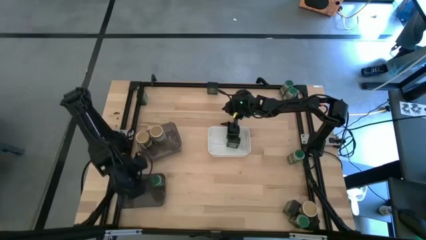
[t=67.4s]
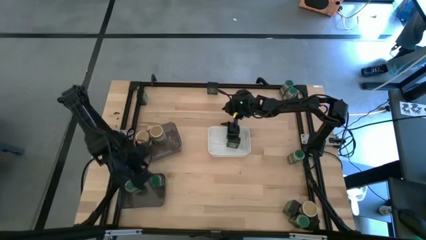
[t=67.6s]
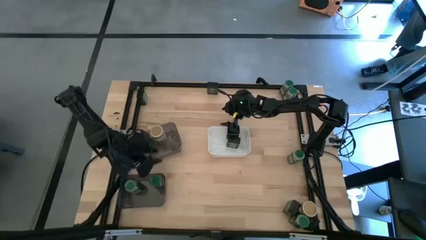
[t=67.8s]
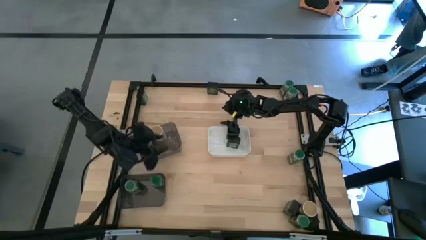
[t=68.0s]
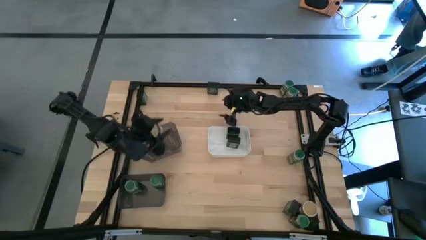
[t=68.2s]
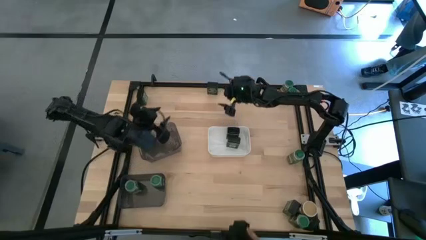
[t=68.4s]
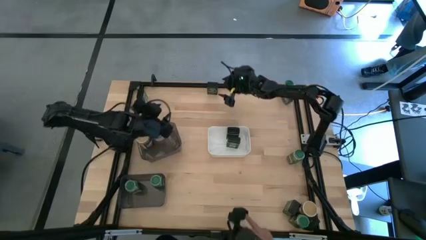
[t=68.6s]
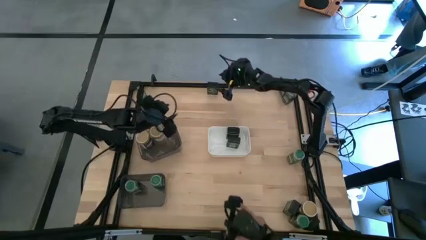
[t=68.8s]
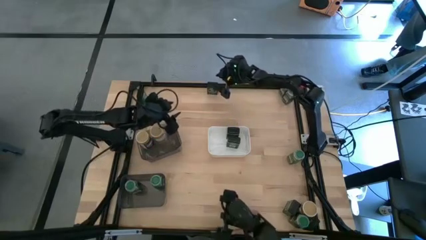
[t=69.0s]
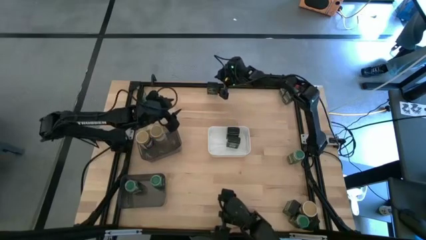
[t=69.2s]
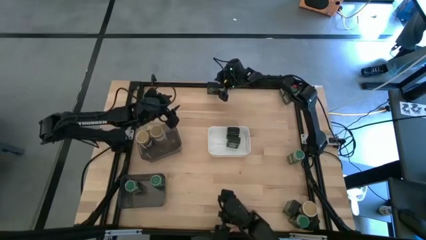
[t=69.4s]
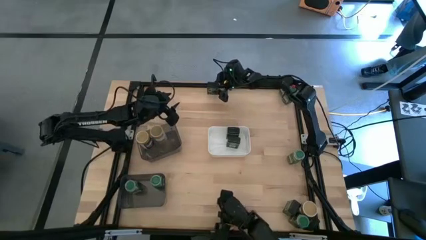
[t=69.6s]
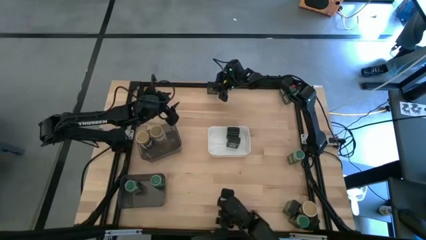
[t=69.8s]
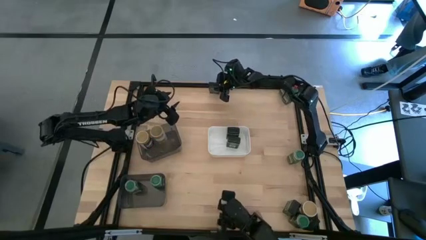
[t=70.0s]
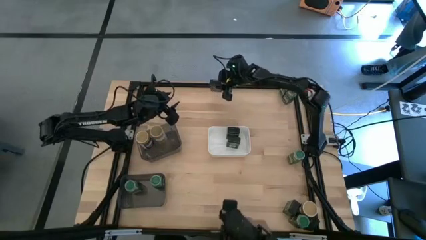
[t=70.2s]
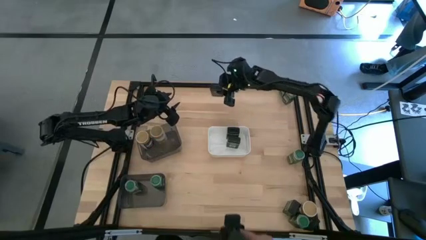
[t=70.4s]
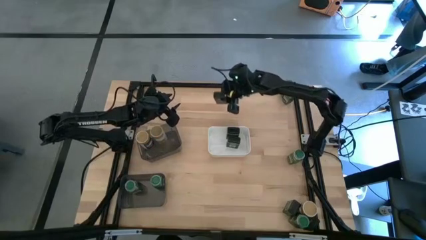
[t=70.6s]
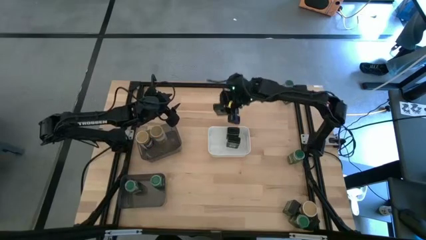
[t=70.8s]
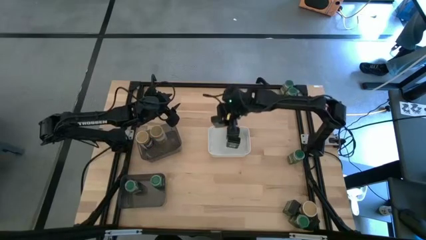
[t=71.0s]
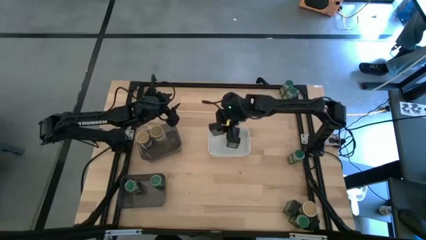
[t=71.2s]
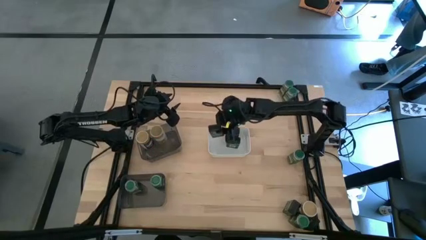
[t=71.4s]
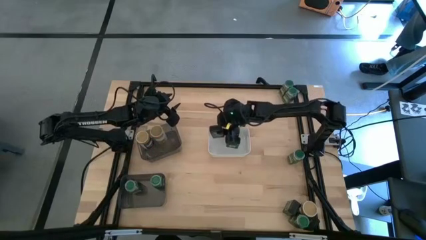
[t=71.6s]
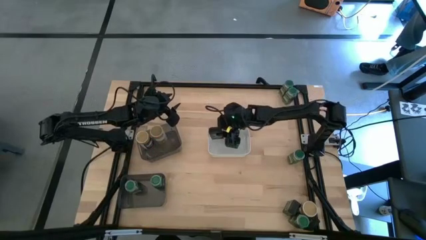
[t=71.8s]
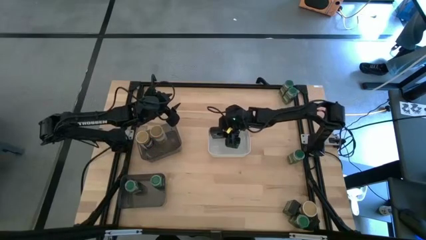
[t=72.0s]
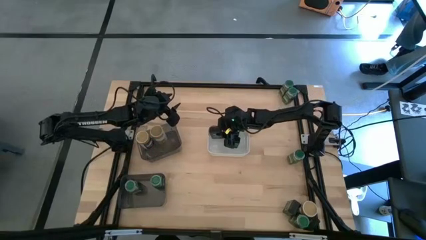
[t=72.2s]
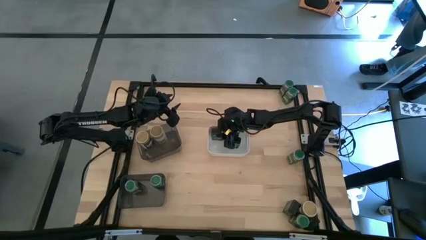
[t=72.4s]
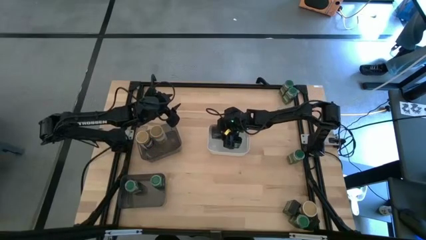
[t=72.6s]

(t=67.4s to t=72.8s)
Task: Sort spices by type
Put the black seasoning can into the white bin

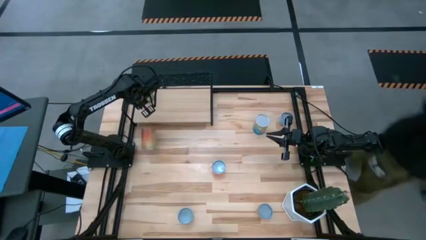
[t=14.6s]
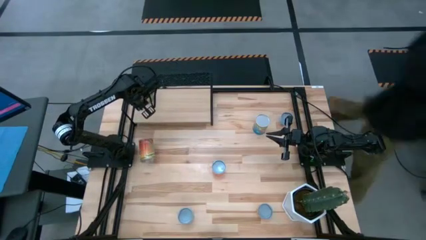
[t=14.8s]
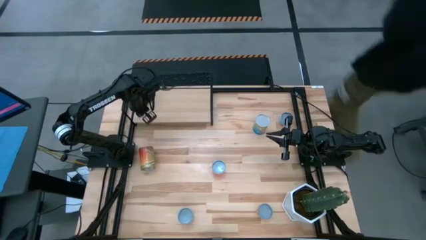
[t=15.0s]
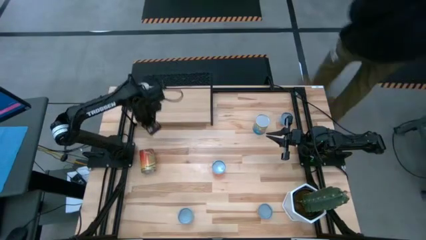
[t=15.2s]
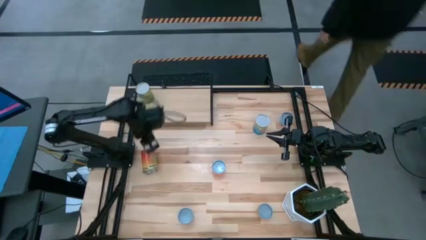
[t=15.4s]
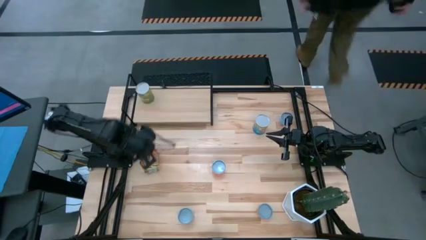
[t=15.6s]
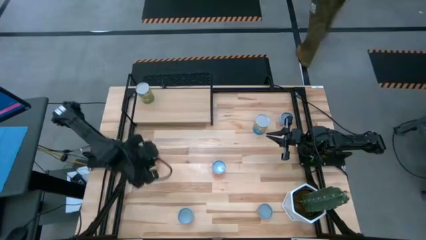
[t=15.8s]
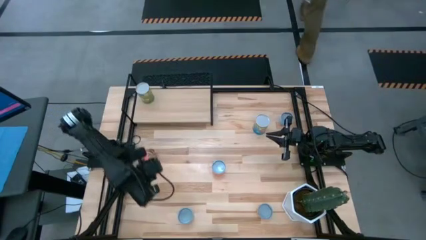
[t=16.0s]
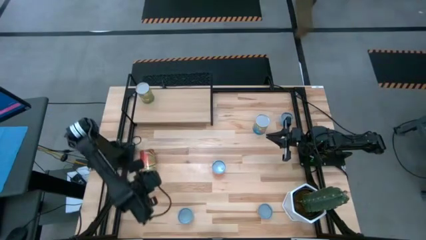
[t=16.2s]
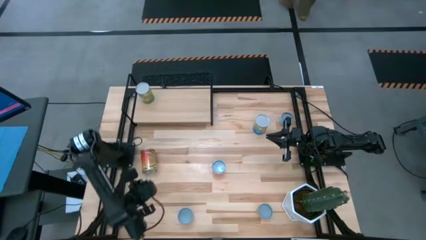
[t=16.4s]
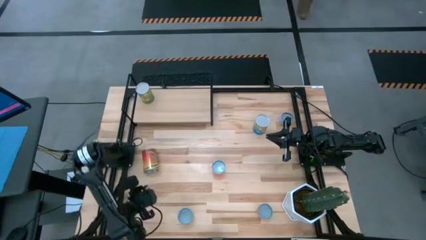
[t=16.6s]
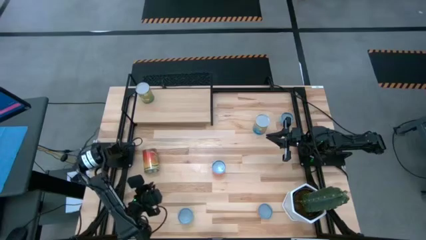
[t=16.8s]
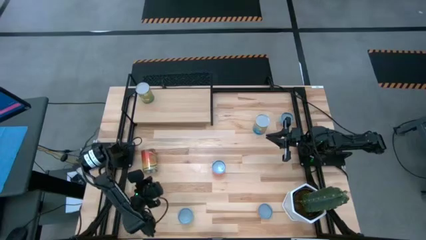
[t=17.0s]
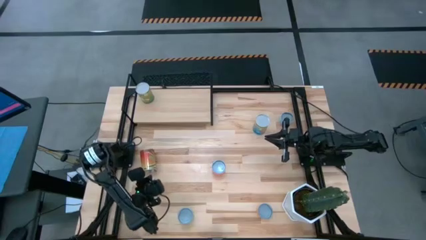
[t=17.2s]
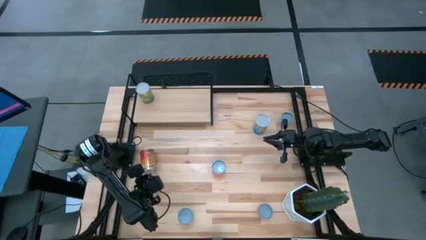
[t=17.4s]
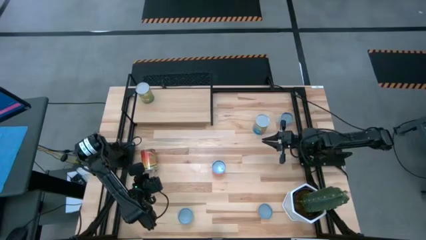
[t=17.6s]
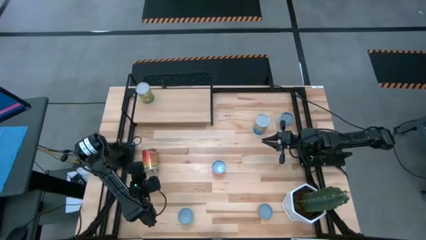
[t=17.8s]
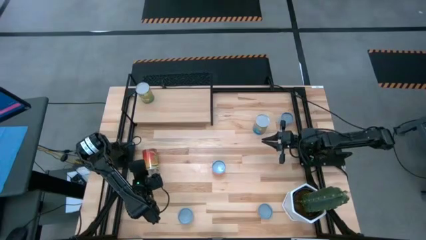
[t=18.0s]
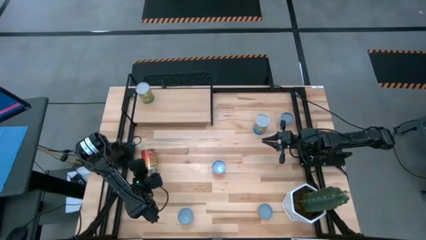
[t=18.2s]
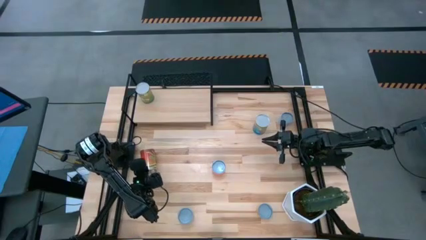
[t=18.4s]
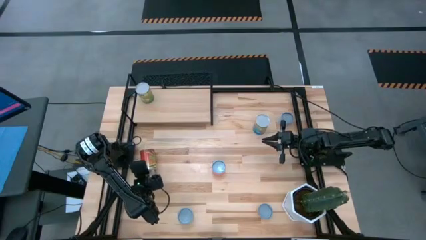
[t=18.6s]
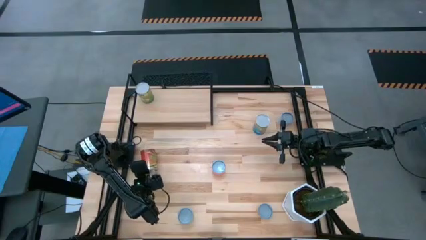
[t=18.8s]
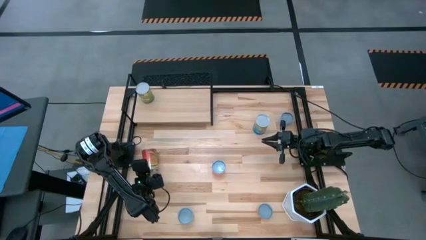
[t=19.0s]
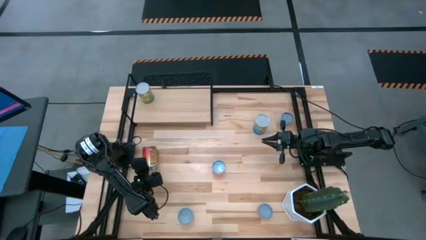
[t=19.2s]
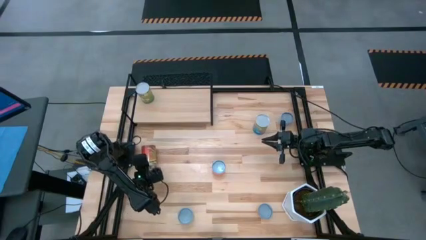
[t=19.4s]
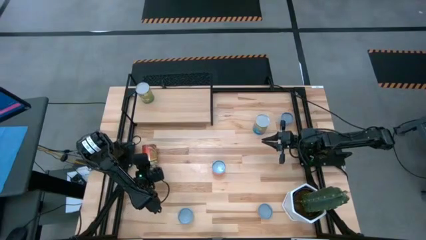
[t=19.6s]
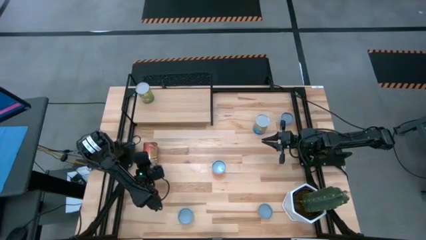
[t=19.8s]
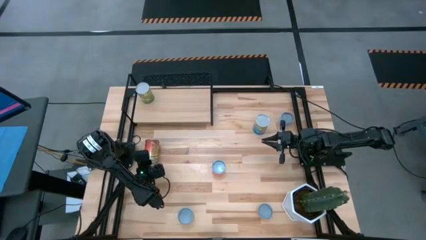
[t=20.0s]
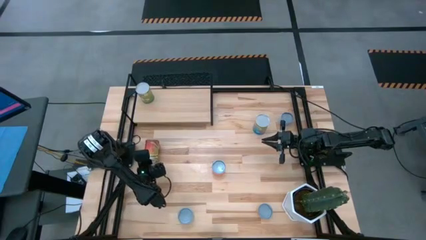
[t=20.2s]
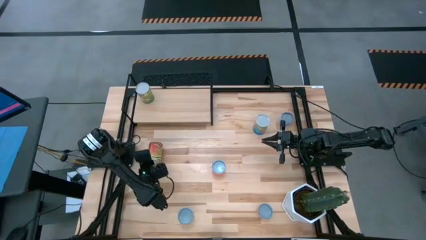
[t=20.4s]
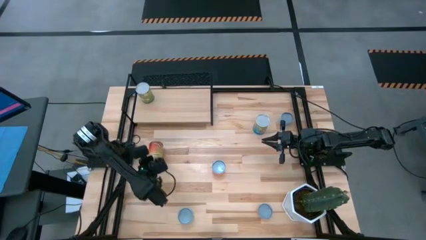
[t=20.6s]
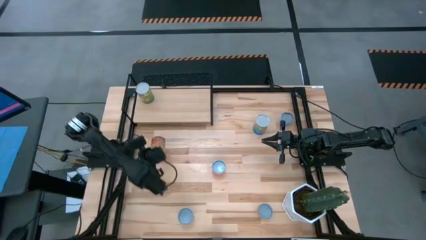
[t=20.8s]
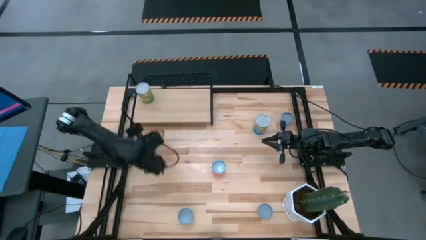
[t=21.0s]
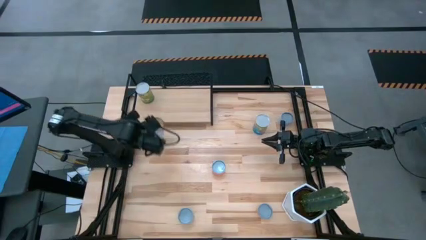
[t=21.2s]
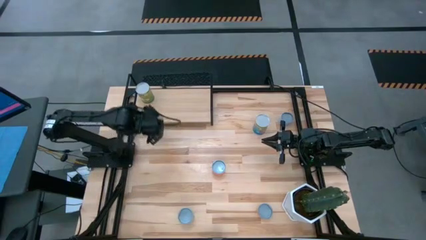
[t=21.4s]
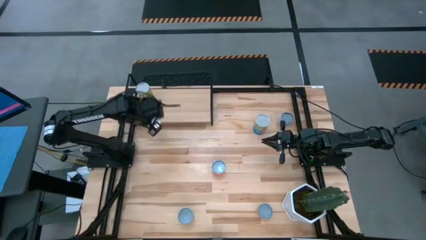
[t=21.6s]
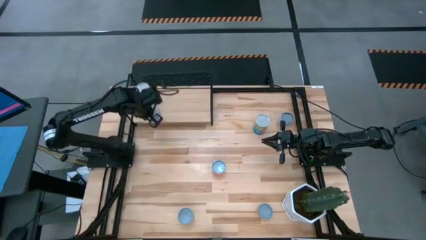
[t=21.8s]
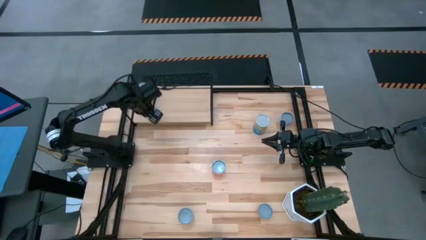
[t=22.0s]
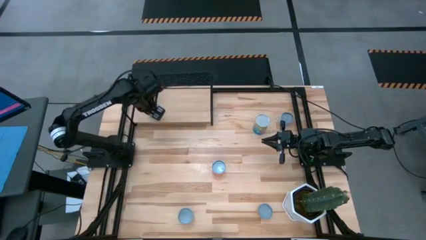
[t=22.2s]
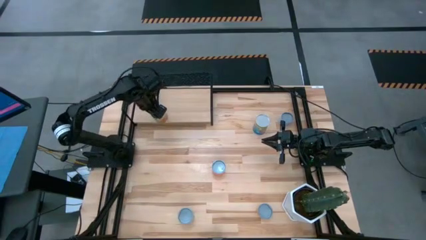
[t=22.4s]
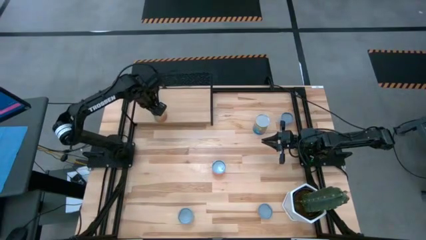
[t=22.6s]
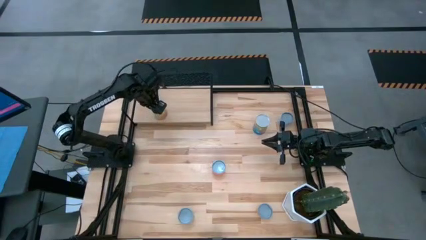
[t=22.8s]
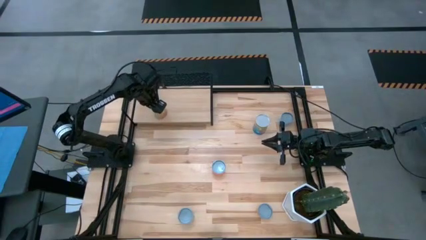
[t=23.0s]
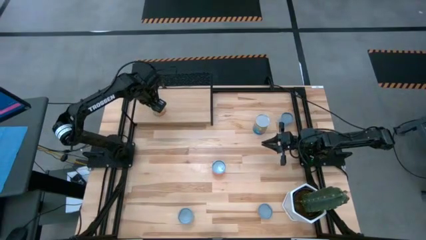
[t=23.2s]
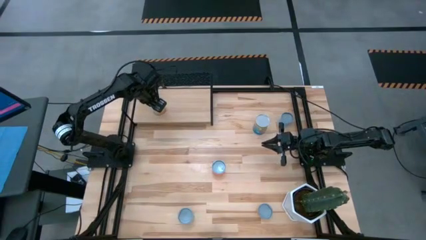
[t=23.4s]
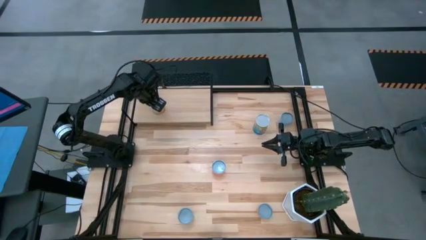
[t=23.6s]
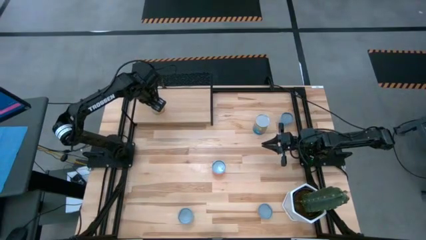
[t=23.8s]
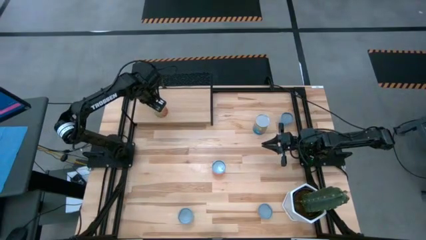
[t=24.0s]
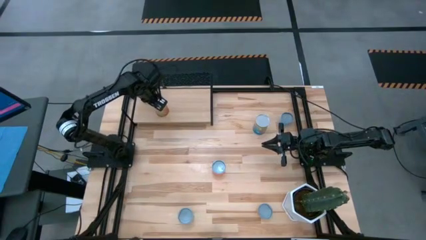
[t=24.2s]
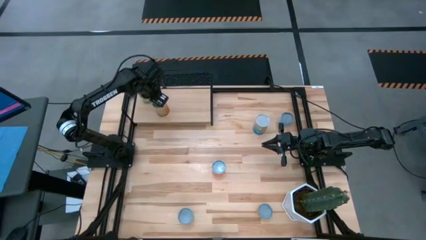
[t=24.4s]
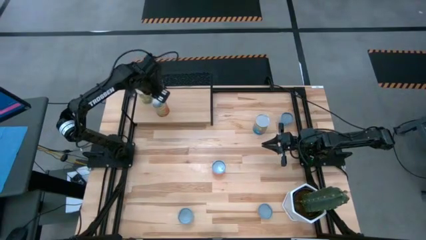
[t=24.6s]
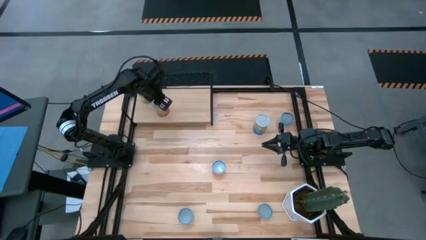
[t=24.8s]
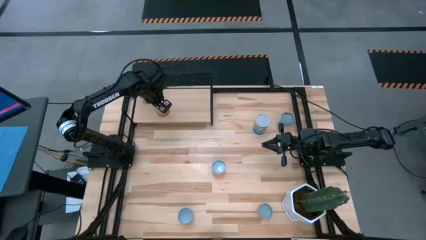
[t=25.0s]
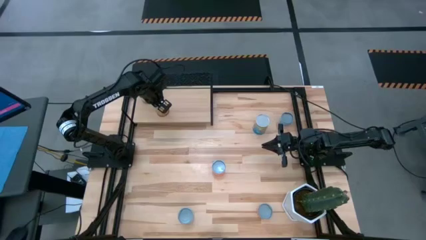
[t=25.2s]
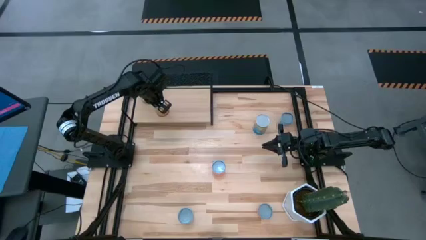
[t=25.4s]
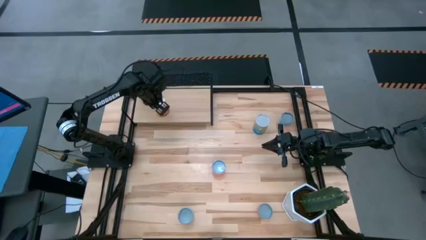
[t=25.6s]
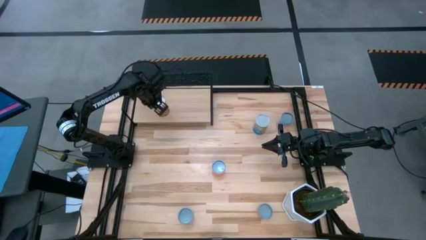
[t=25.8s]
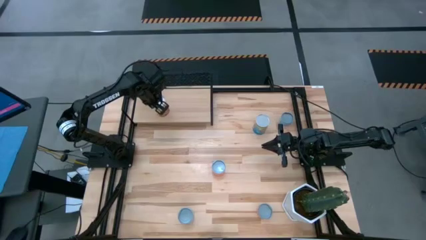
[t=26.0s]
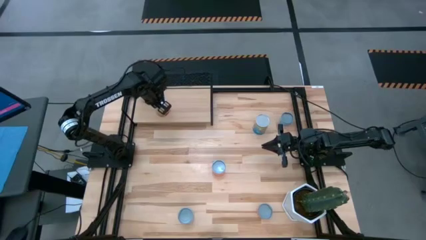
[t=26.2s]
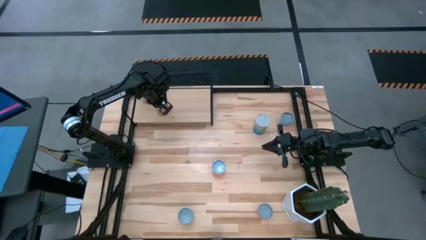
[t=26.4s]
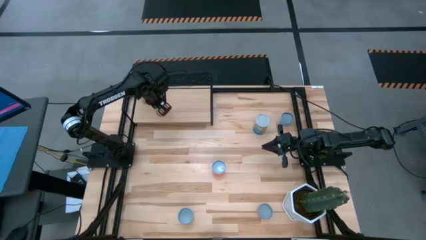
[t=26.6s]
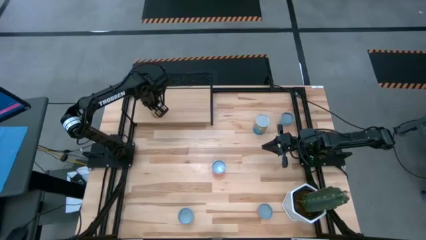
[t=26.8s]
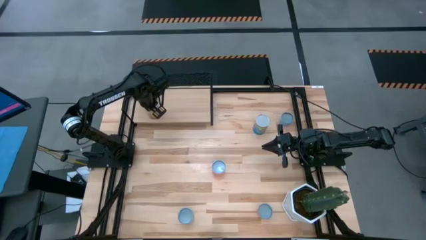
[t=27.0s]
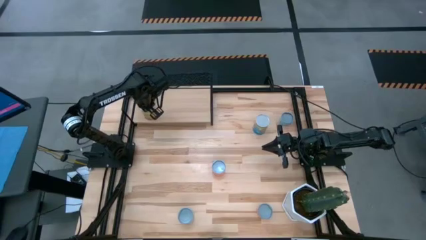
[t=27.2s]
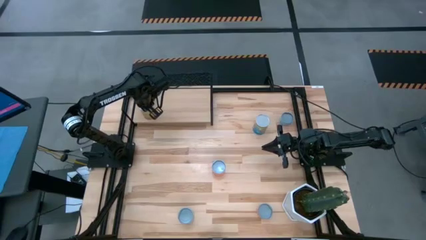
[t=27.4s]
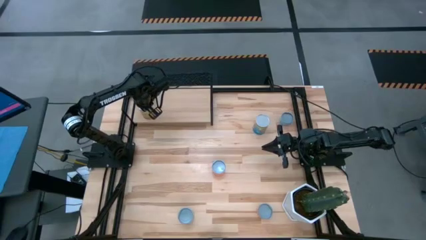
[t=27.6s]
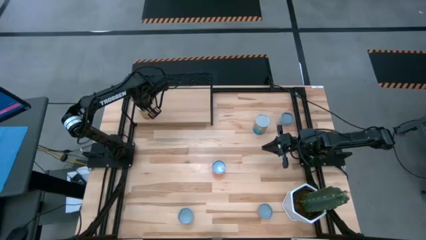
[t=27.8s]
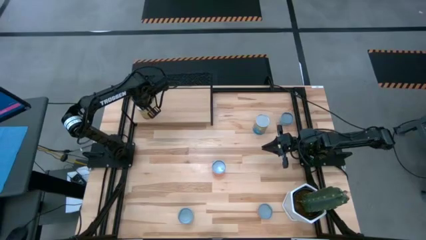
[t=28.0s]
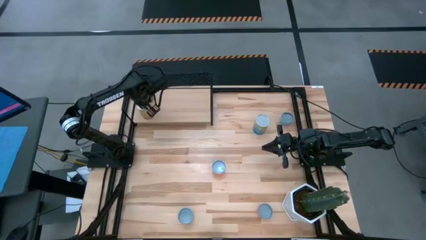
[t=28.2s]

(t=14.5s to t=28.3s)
Task: Pick and place cans onto a shelf
Put the canned green beans on the shelf
